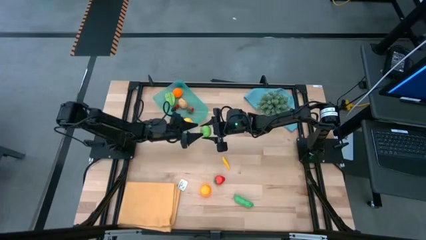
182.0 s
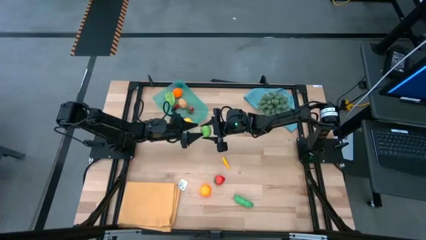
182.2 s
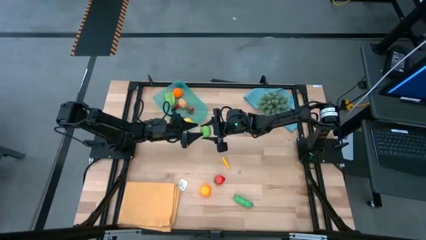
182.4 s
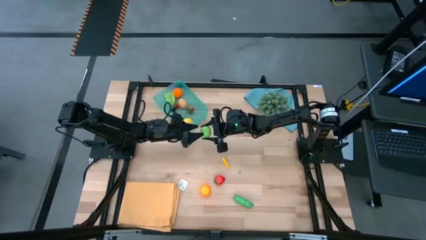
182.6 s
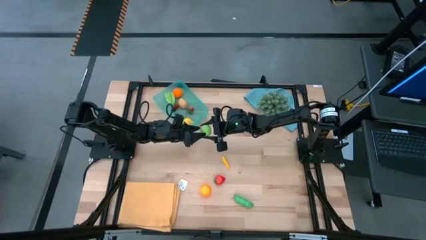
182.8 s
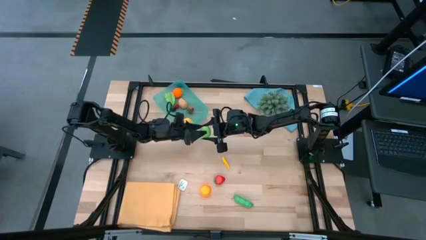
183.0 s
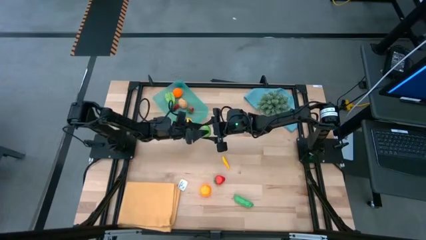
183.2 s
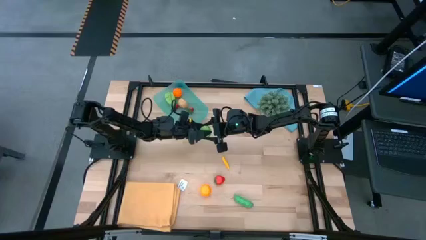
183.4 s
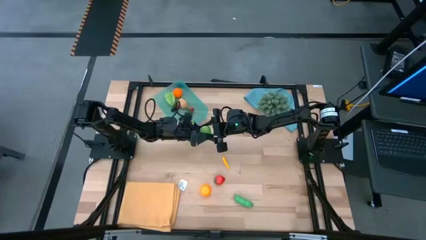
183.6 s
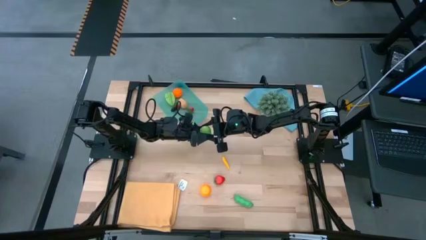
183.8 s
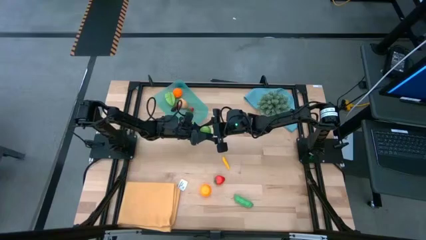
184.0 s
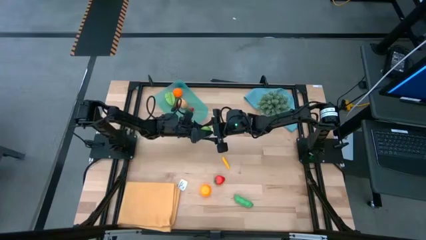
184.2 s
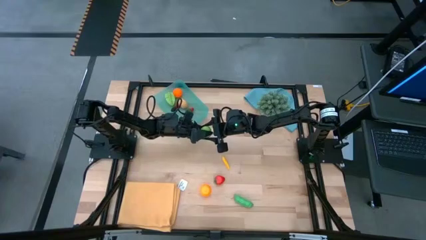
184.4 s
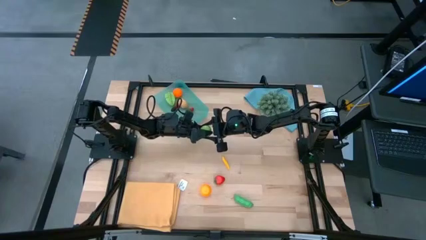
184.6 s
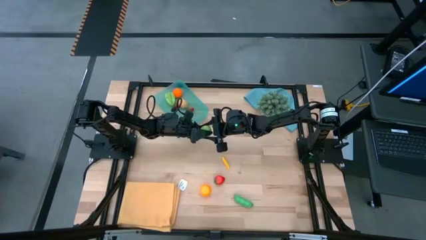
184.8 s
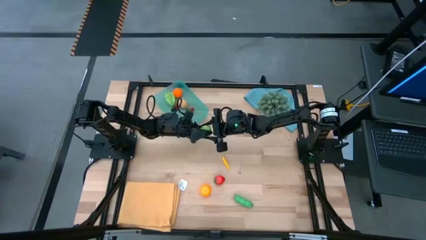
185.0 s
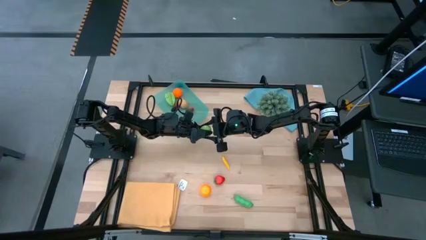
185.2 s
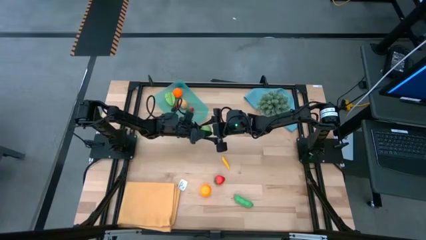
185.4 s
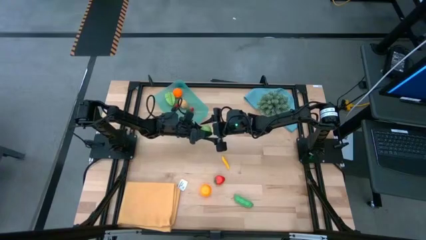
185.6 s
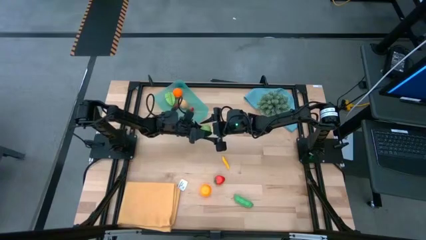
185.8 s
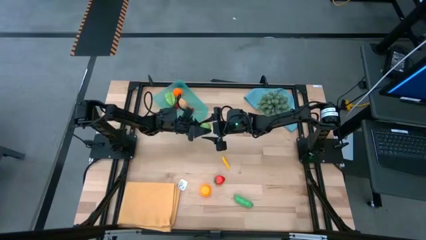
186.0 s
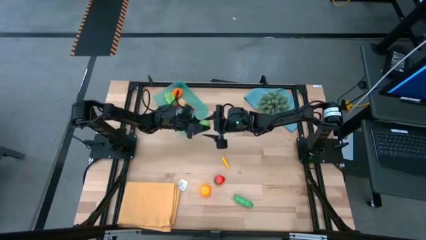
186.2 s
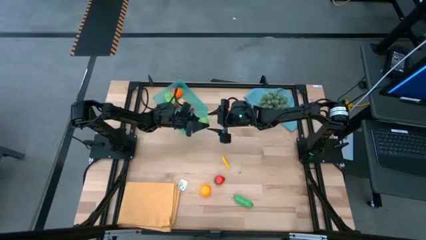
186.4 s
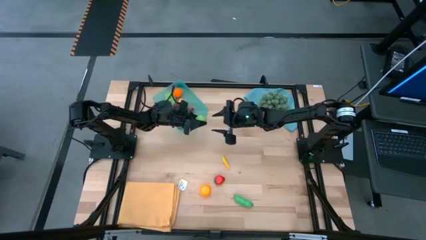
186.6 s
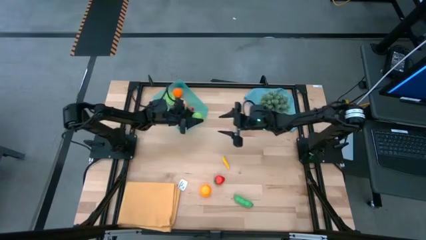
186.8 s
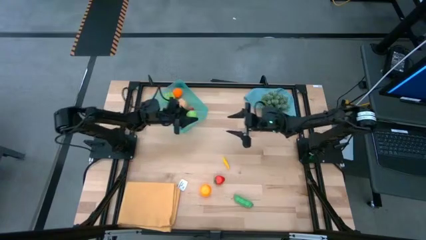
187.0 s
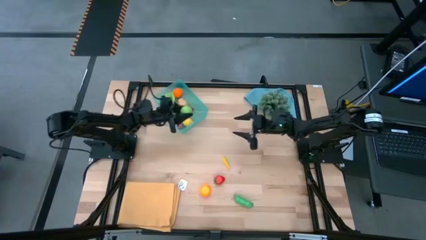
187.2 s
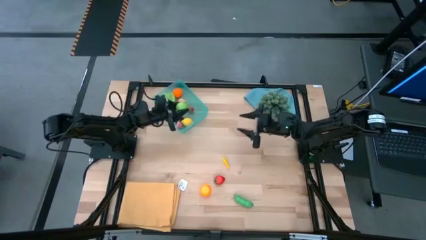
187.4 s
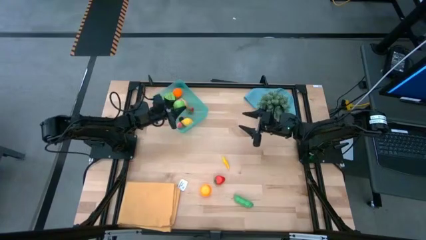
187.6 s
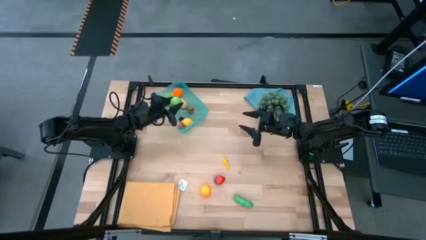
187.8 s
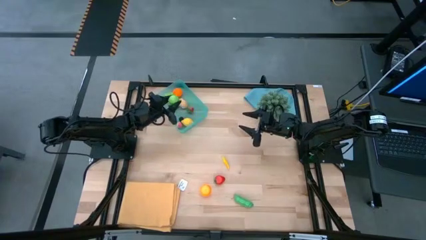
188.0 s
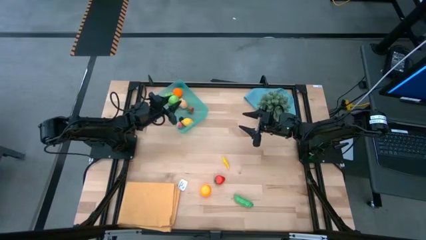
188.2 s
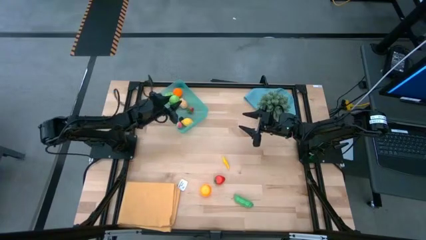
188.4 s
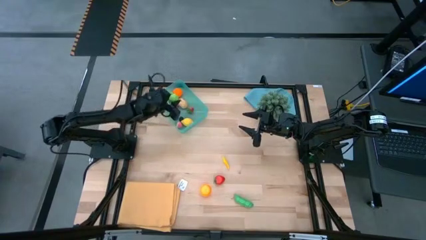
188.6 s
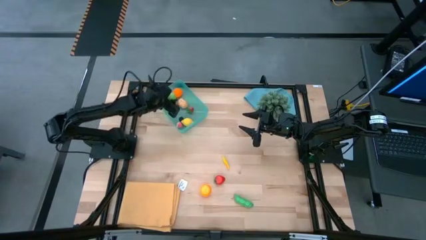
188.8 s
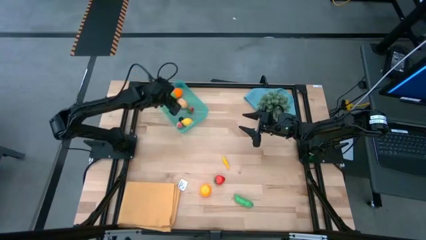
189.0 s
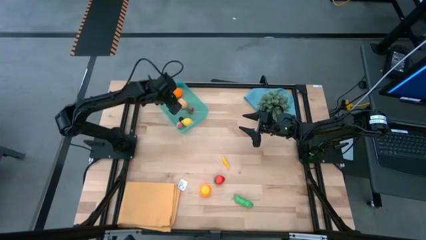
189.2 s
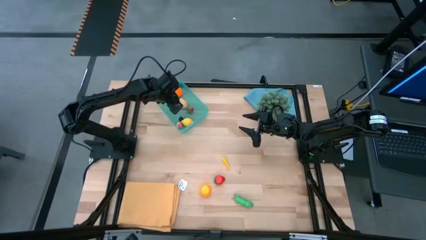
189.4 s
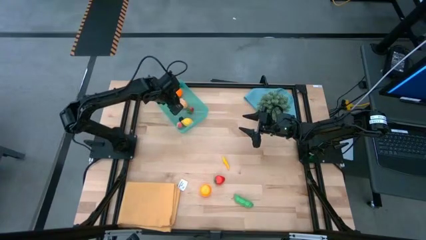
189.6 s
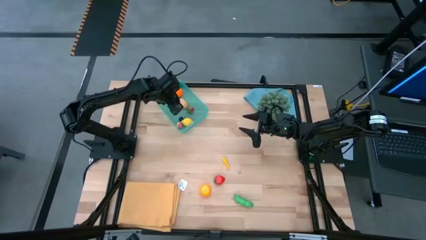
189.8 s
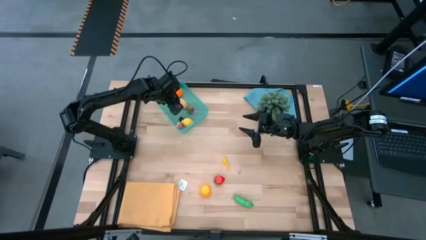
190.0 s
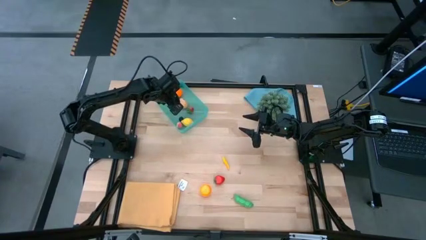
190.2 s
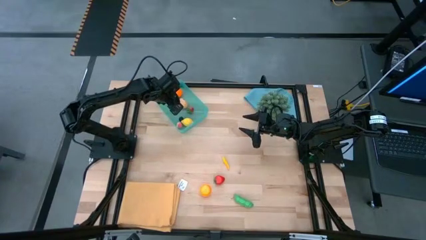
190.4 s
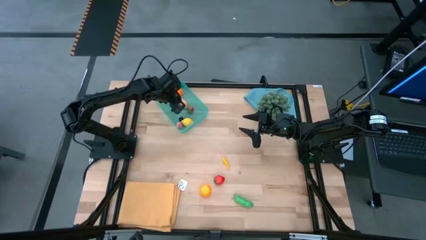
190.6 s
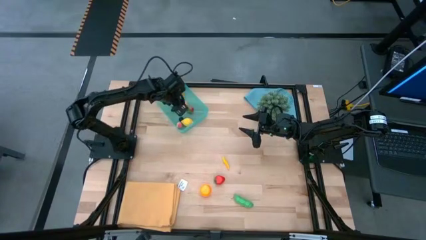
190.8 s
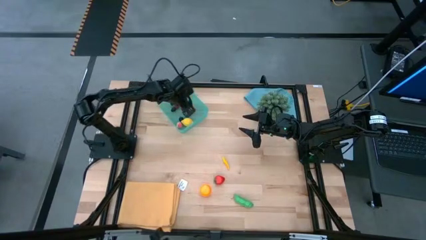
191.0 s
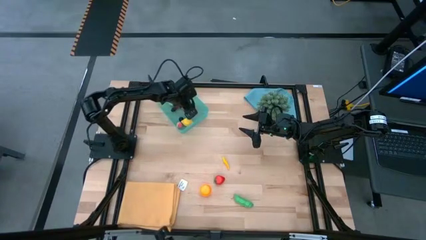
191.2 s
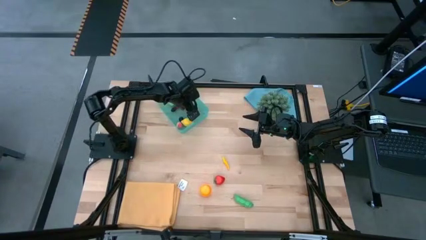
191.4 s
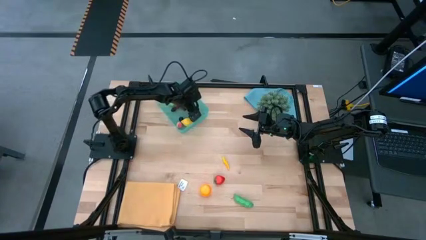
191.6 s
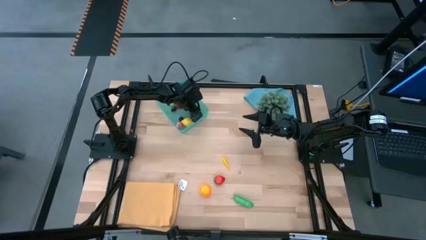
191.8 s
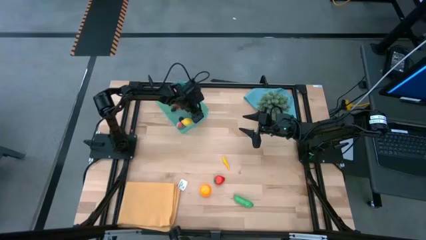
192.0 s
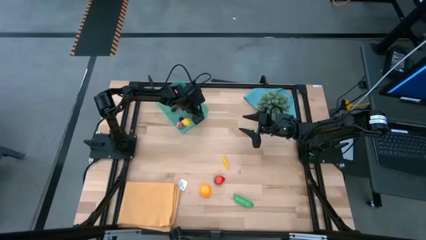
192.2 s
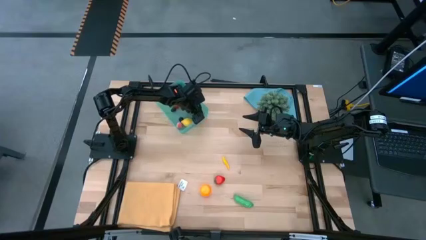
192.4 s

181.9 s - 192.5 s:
Task: Pick and placing Produce into tupperware
Put the green cabbage into the blue bin

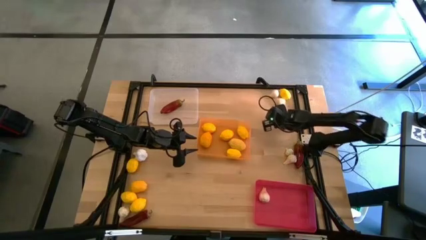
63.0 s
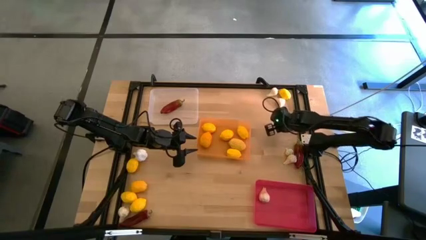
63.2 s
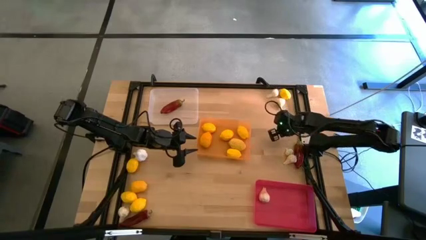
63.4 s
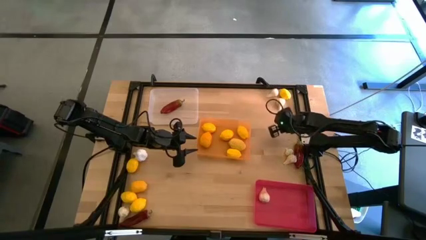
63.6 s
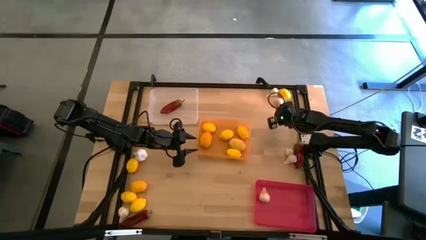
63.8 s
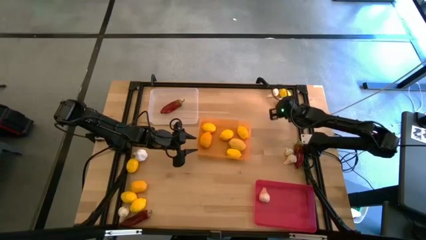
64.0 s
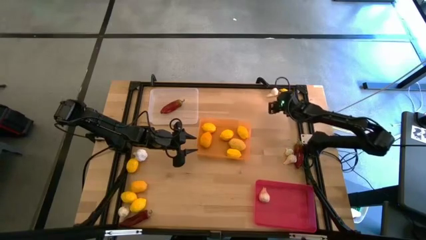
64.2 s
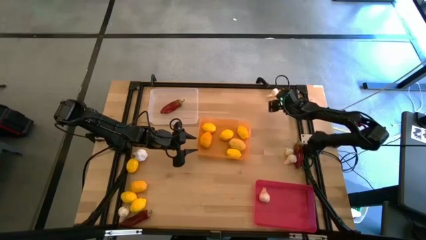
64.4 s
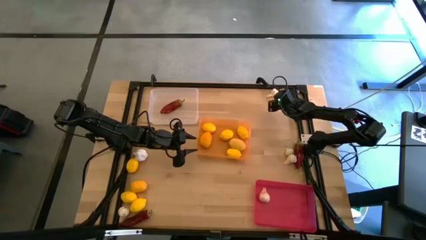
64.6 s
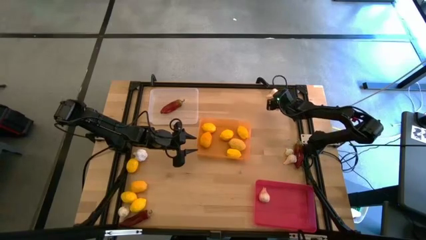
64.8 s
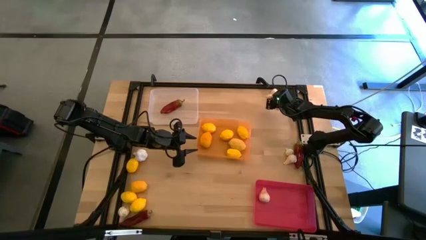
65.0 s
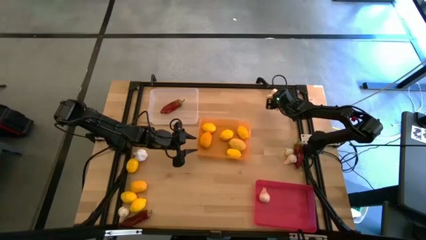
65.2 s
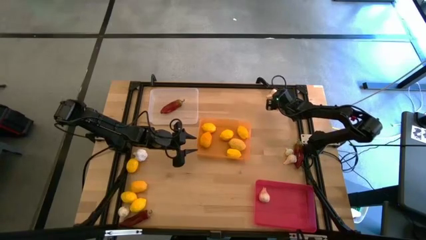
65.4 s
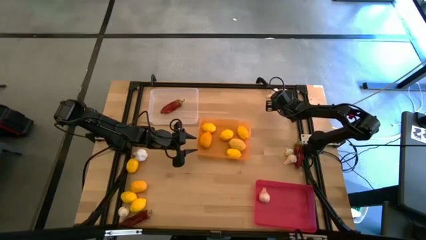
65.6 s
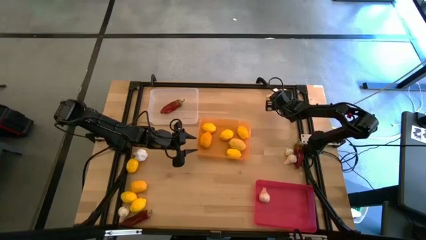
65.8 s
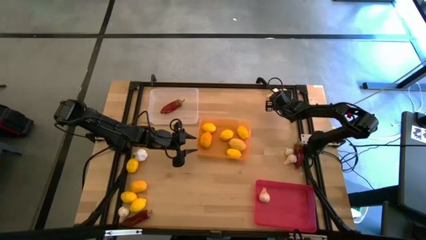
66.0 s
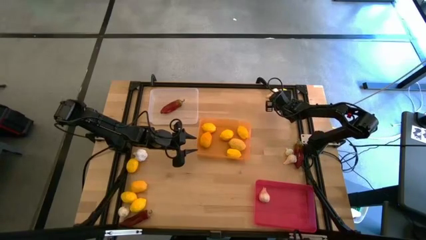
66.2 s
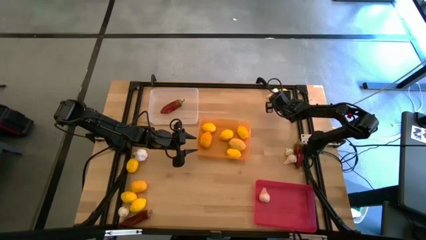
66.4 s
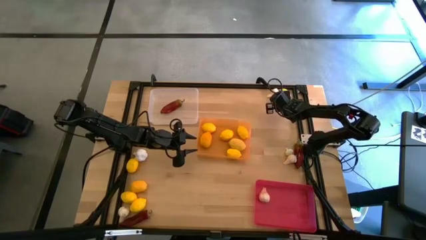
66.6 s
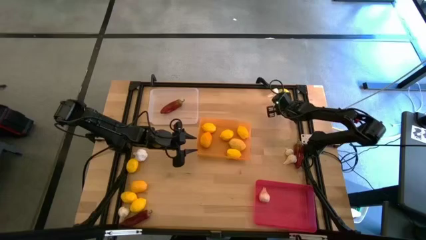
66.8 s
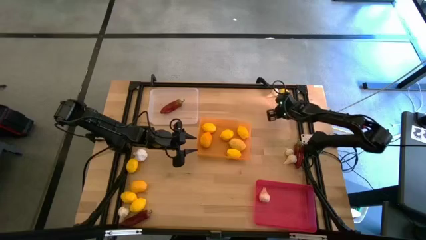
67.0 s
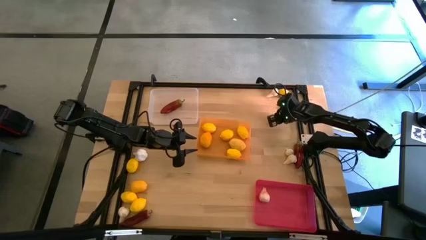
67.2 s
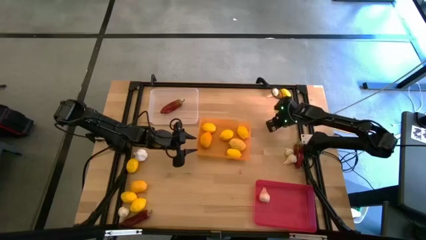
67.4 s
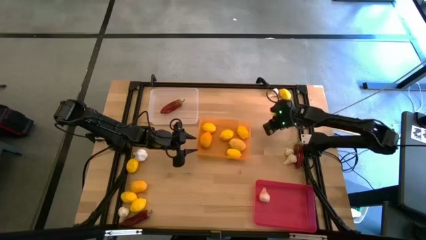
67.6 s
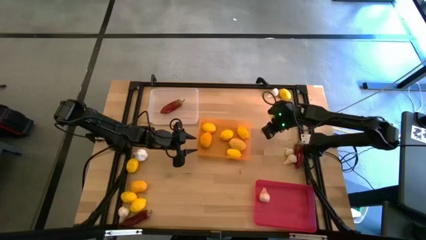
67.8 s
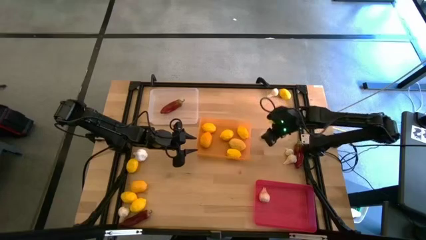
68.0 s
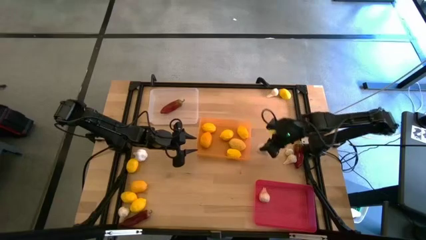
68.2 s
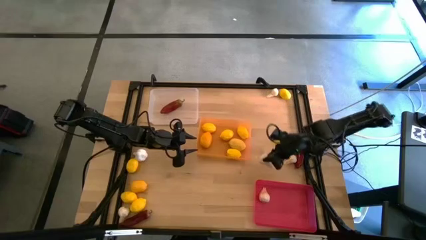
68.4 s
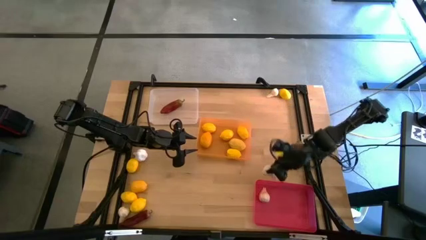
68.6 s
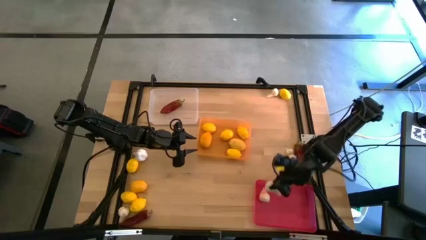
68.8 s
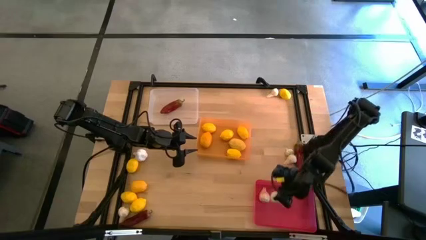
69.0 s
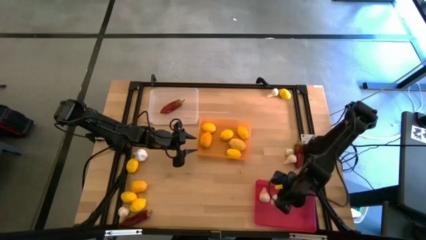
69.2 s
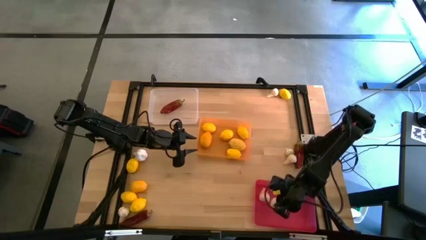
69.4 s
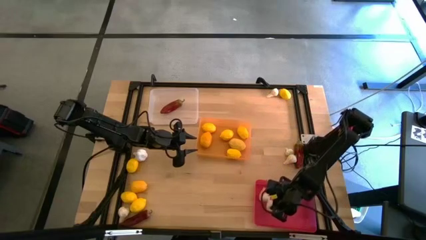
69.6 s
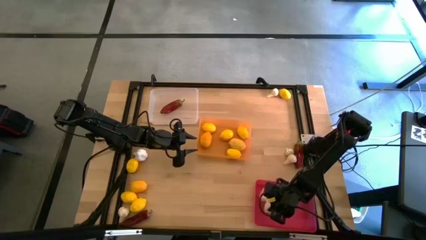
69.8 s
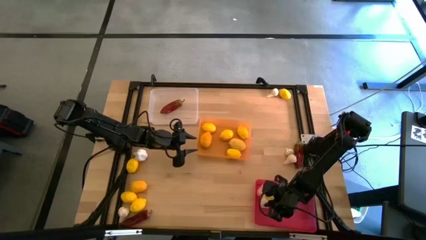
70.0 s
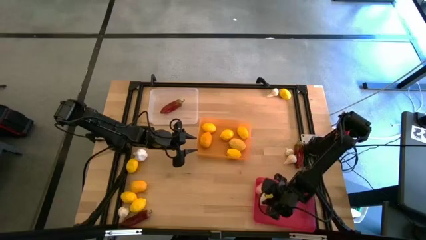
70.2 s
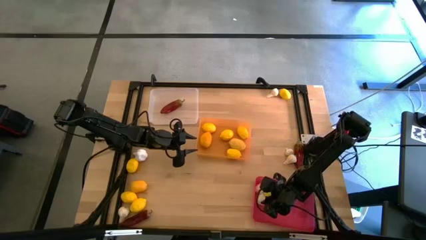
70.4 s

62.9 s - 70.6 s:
Task: Sort produce into baskets
Put the garlic into the red bin
